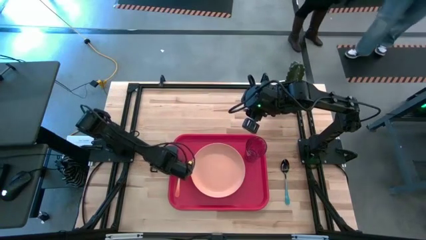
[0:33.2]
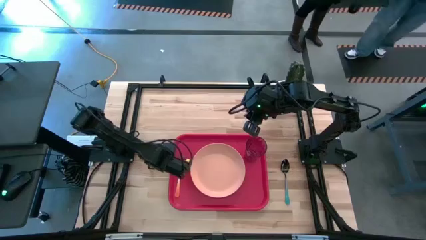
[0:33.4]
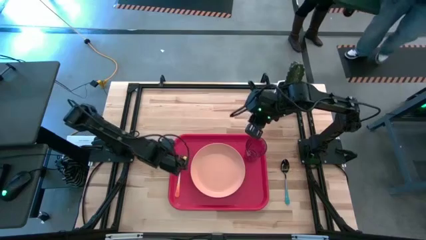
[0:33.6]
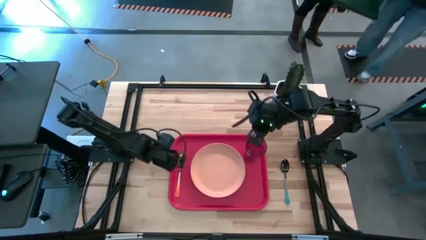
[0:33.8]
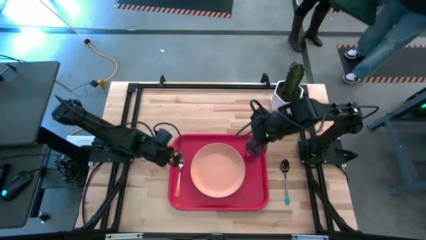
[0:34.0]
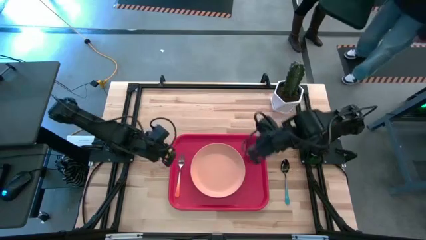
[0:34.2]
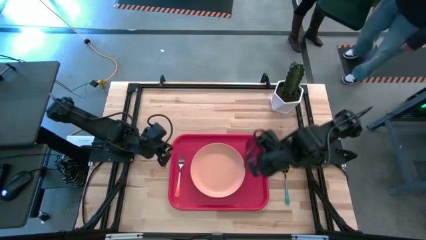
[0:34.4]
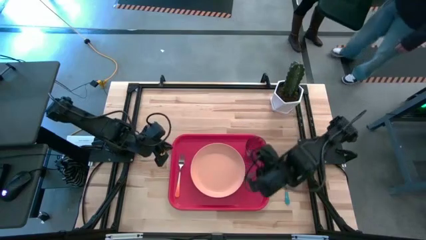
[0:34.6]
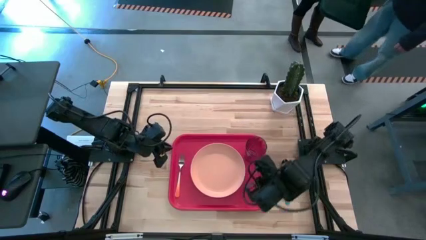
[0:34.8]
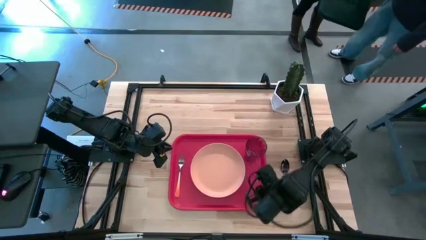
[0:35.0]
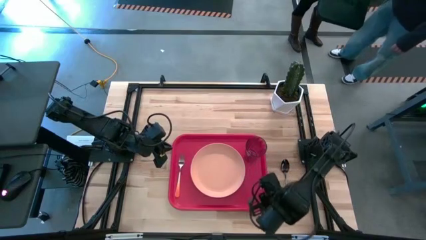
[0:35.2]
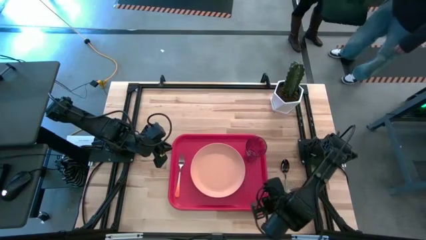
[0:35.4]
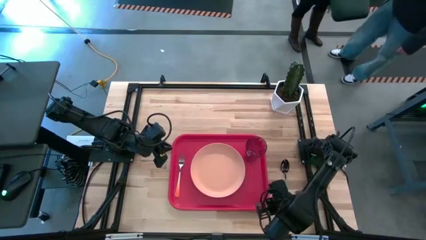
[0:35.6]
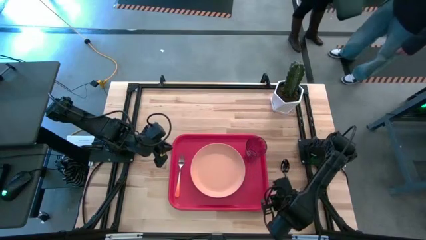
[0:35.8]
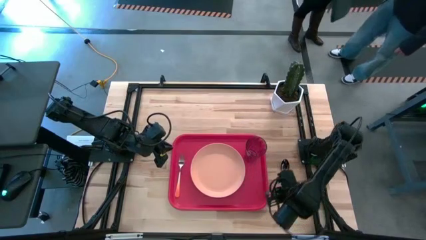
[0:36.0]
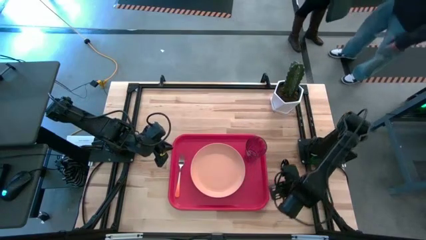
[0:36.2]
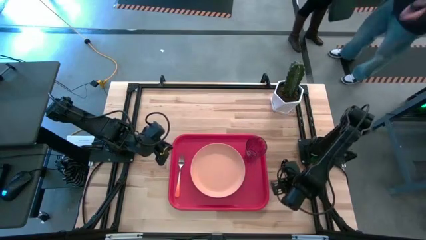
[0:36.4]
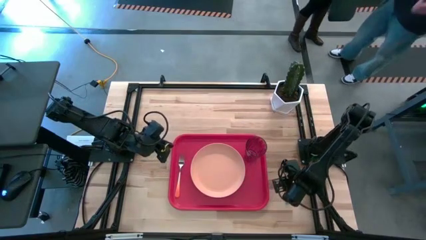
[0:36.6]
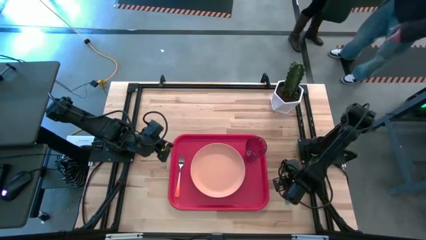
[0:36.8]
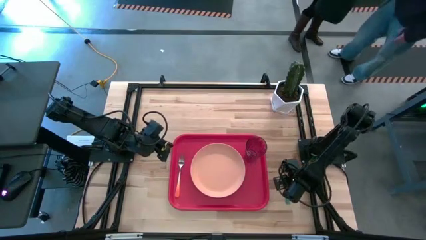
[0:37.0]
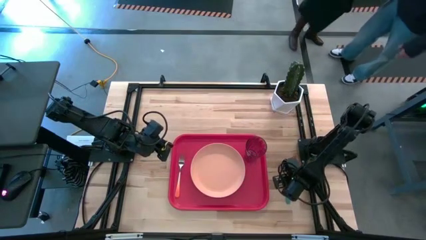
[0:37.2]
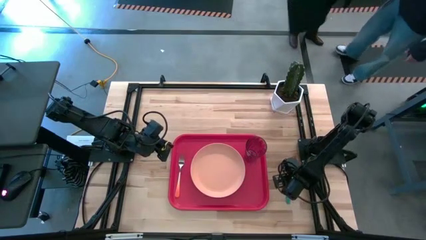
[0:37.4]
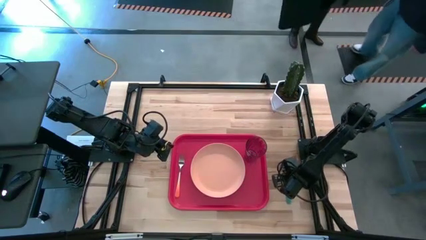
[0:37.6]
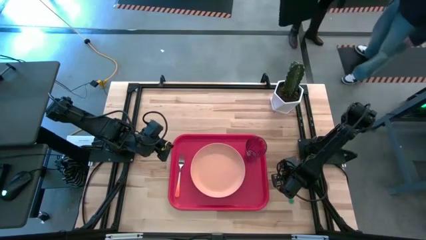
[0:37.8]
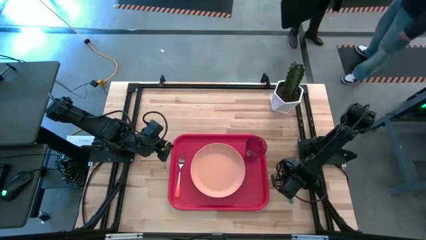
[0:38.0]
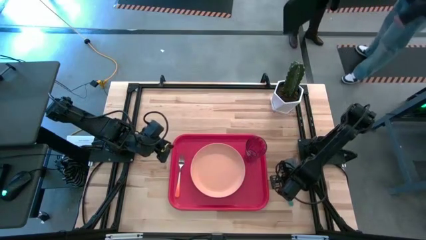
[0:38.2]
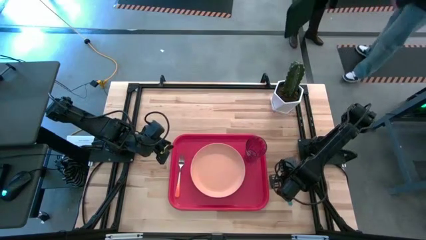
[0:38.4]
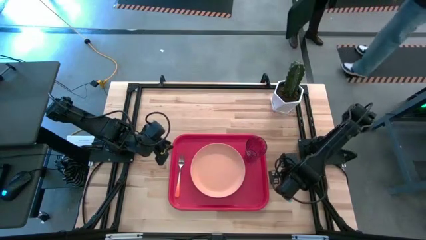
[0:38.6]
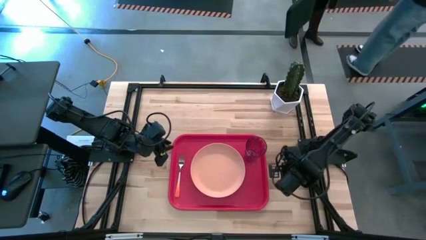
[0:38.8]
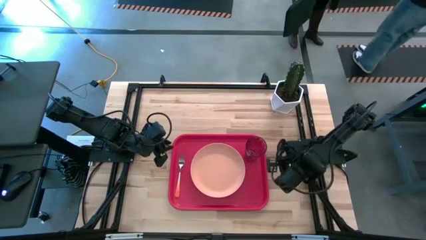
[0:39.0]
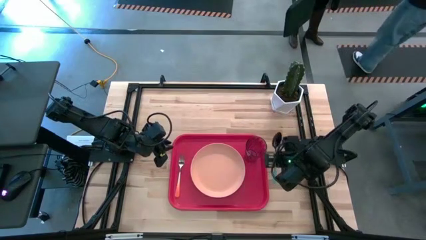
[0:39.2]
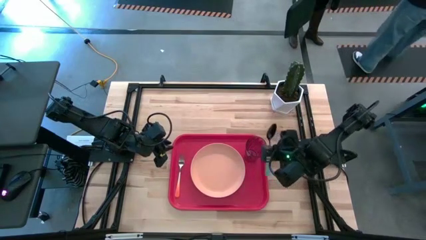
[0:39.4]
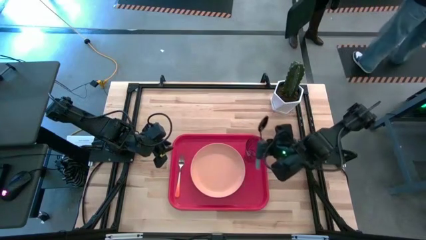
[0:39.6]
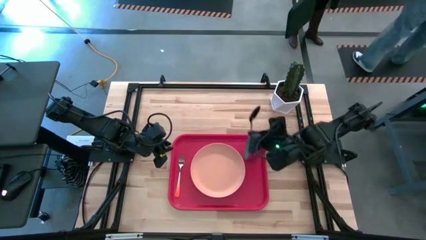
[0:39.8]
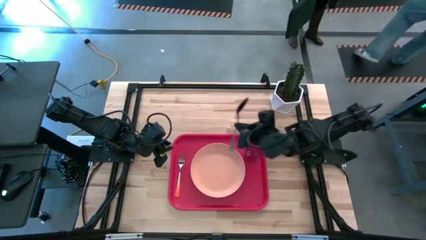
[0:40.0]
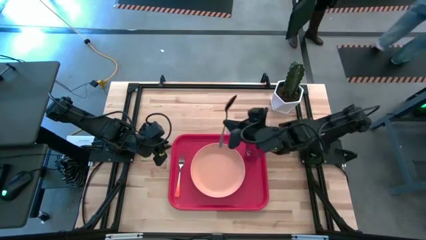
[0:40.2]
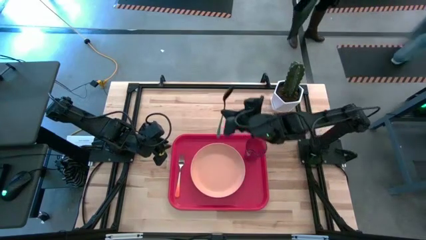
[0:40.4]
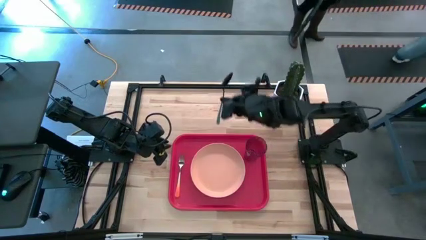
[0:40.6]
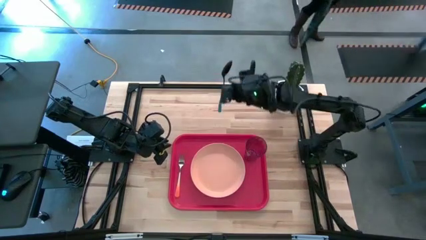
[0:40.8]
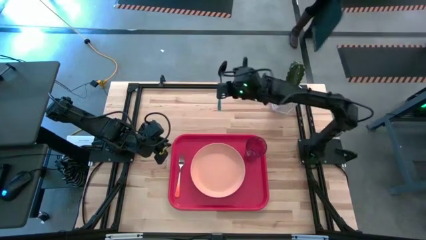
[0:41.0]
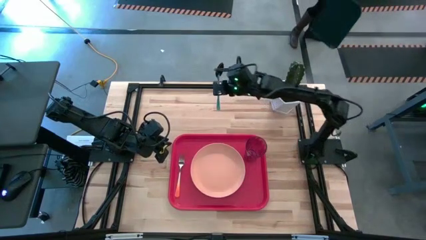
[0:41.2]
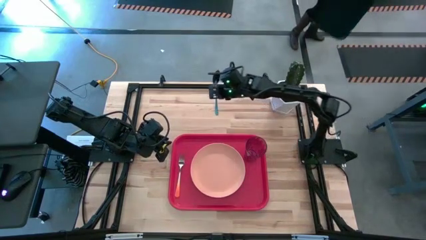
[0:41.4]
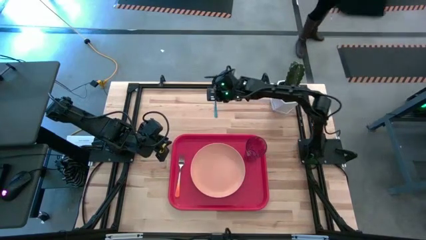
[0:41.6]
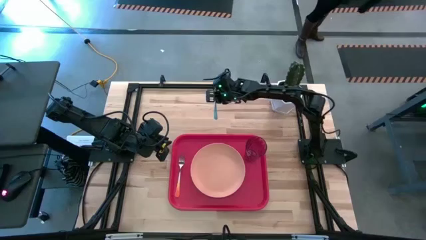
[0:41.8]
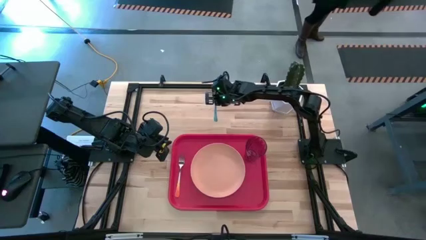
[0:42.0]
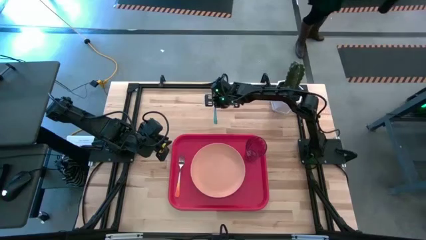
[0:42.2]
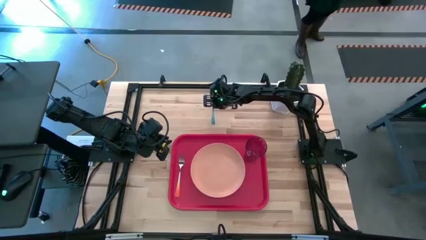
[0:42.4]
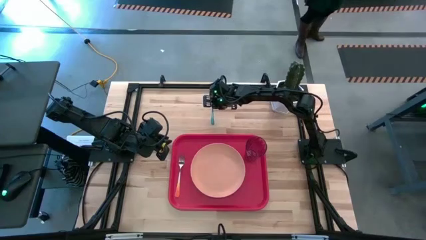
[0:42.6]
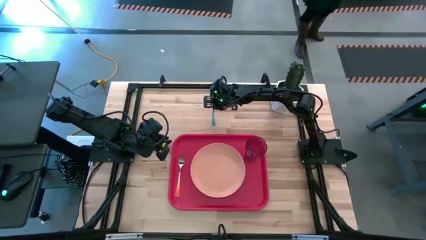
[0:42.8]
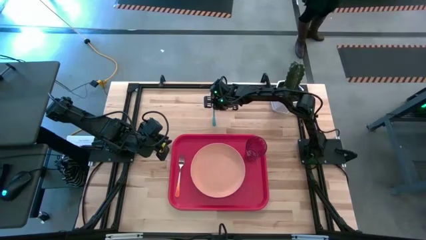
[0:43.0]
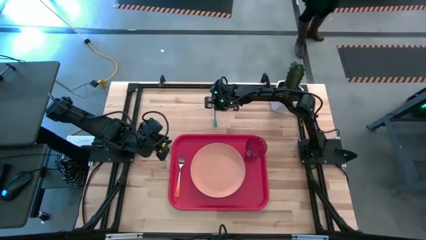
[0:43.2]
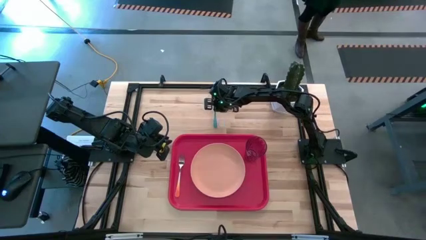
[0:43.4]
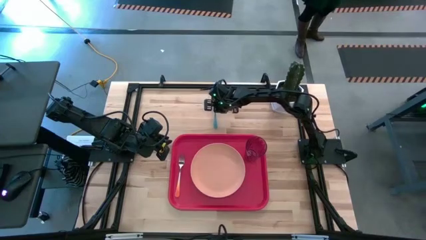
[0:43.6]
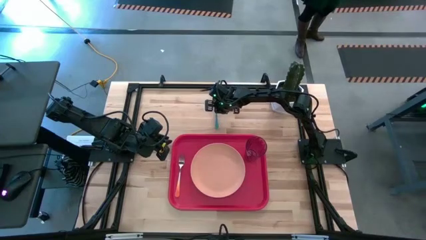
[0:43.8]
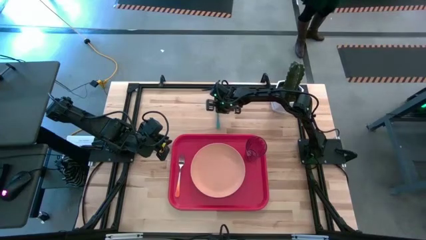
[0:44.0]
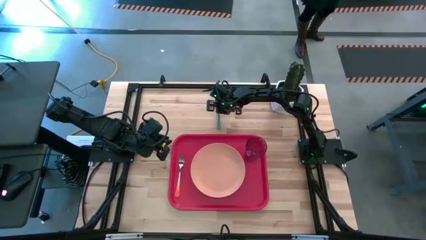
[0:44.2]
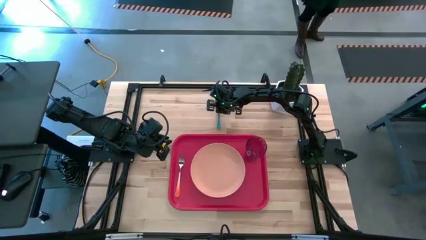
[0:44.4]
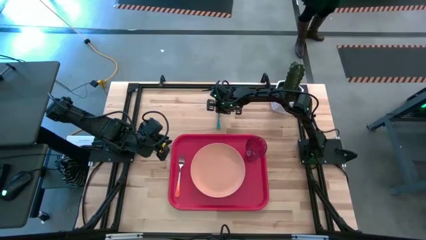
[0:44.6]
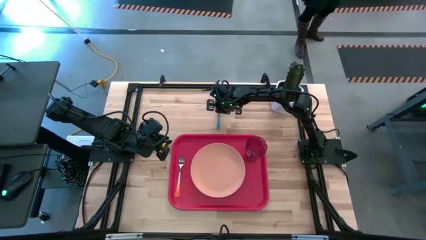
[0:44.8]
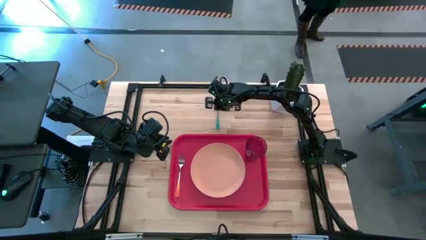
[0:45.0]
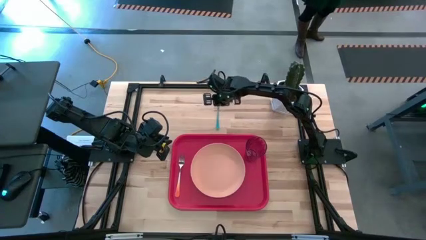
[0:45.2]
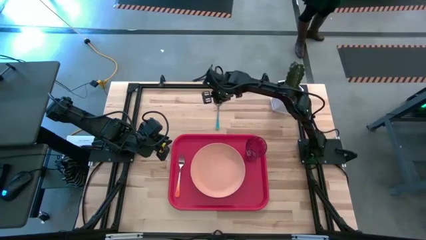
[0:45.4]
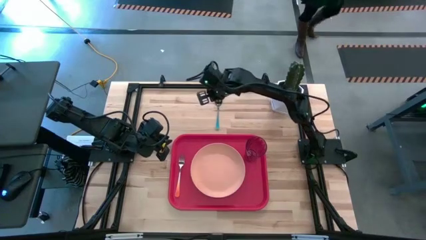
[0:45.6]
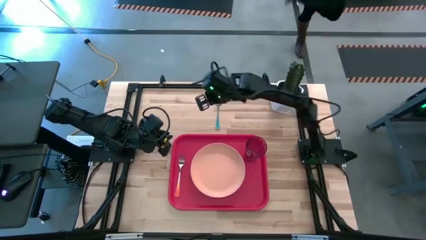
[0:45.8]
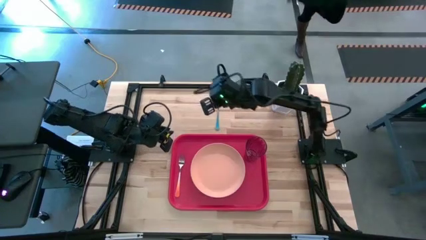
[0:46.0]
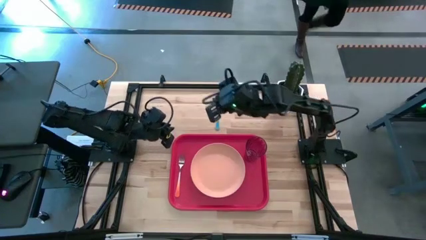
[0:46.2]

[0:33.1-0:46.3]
Task: Pick and place plate/cup/fork/spoon on tray
Put the blue spoon to the right of the orange fork on the red tray

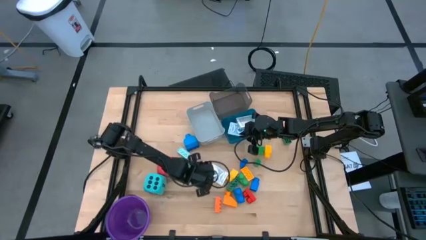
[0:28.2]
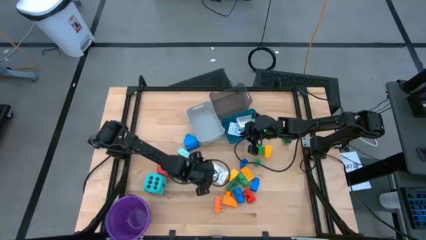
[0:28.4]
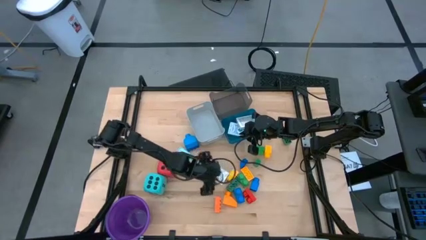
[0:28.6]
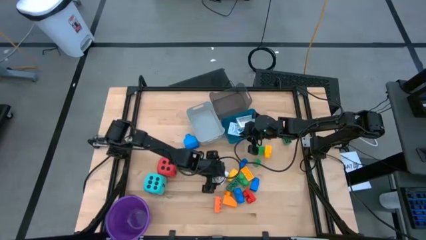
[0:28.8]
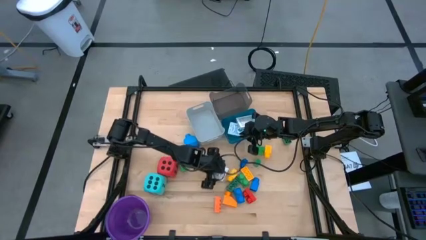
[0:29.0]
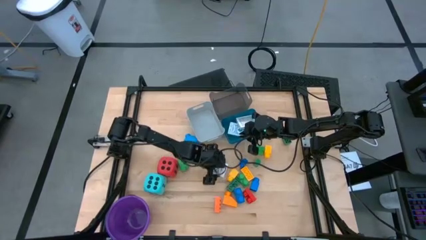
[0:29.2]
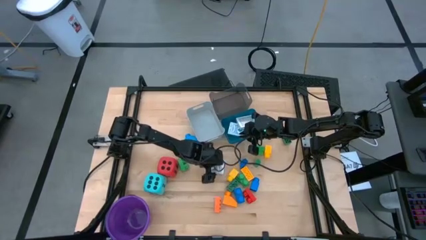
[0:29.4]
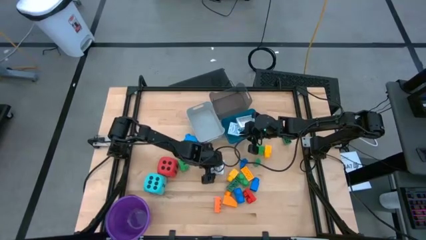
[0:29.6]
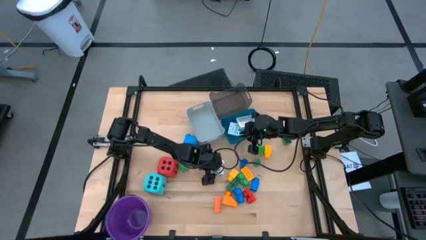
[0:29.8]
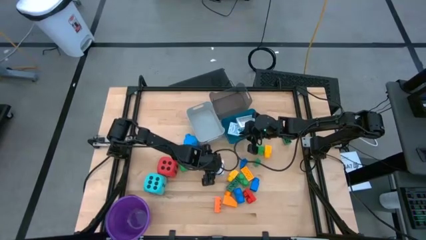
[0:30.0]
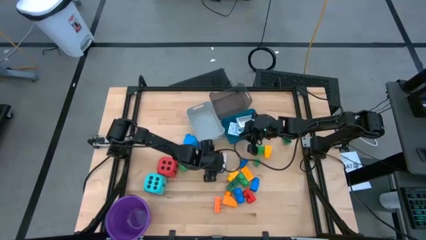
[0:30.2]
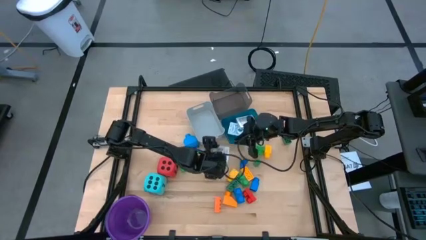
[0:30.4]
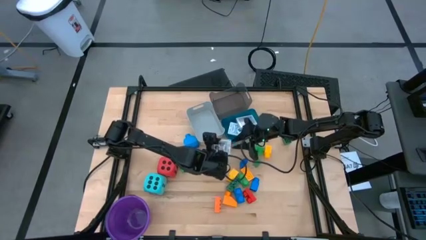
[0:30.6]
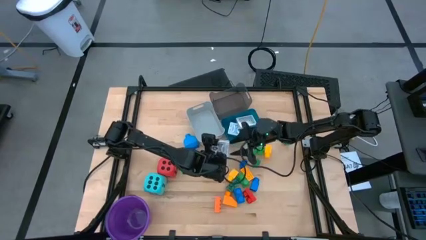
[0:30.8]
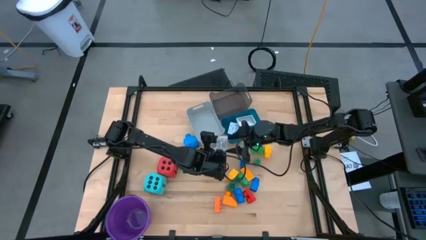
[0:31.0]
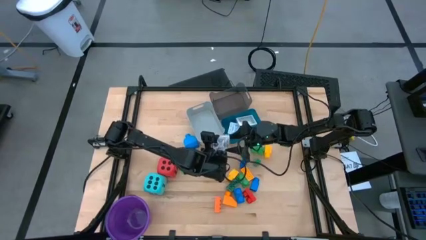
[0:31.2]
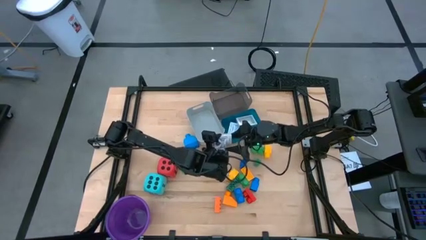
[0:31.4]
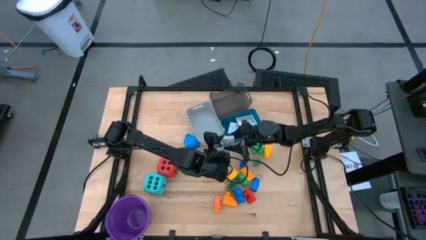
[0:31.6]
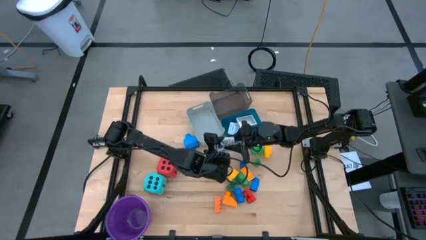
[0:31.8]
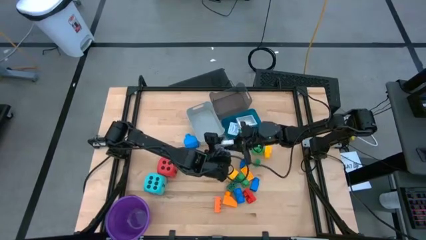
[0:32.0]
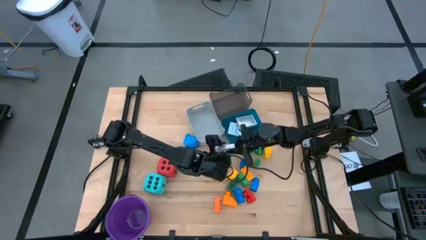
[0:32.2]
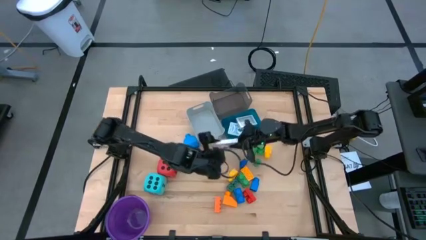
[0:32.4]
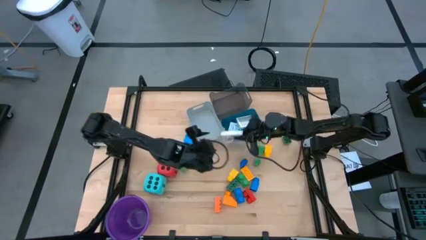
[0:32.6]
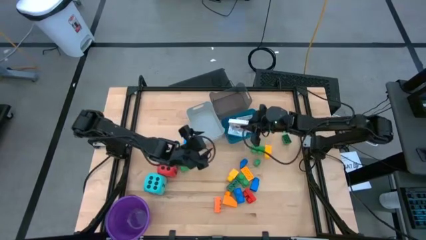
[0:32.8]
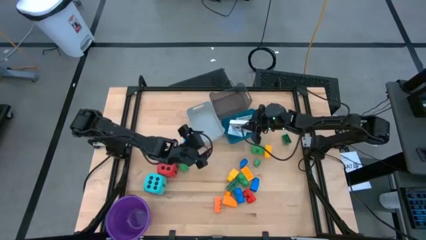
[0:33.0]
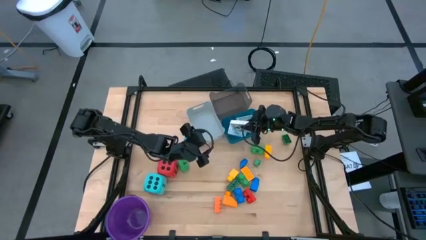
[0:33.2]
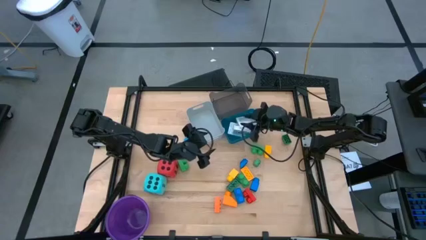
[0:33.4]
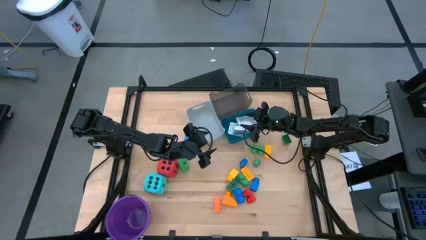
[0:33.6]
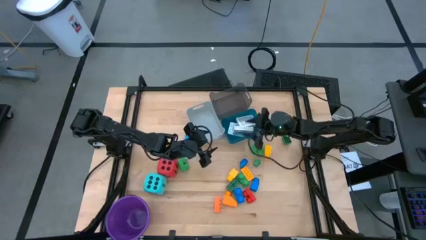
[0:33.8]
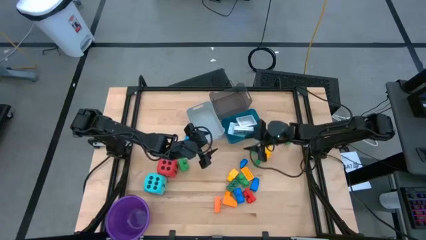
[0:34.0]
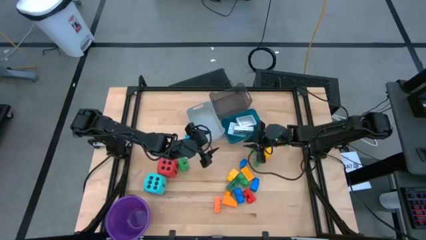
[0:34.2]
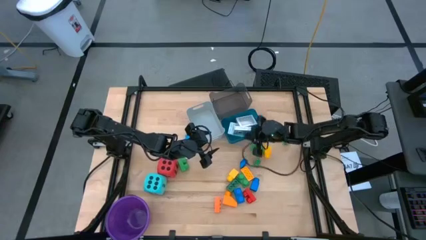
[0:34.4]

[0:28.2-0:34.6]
Task: Pick & Place Toys
Put the black deck of cards into the blue bin
